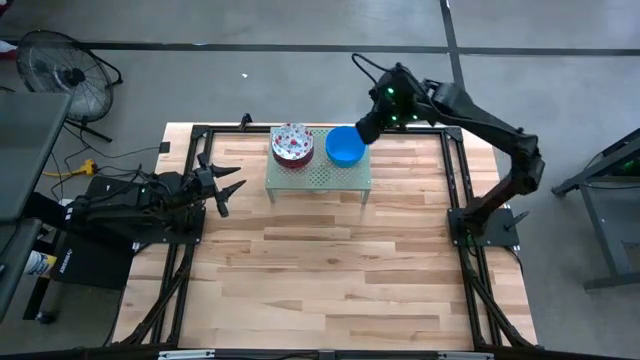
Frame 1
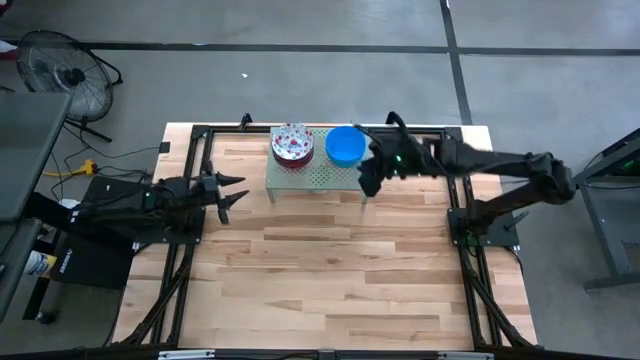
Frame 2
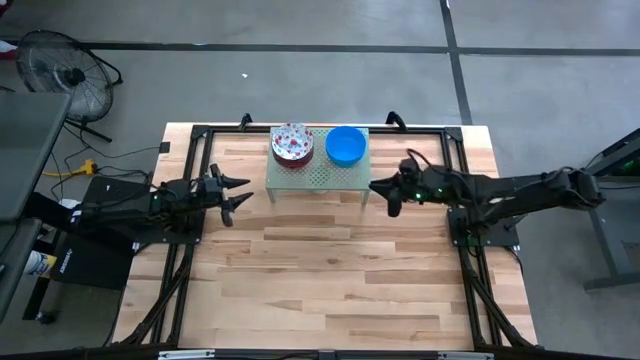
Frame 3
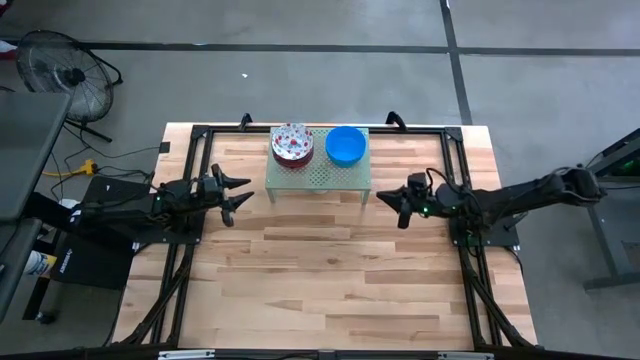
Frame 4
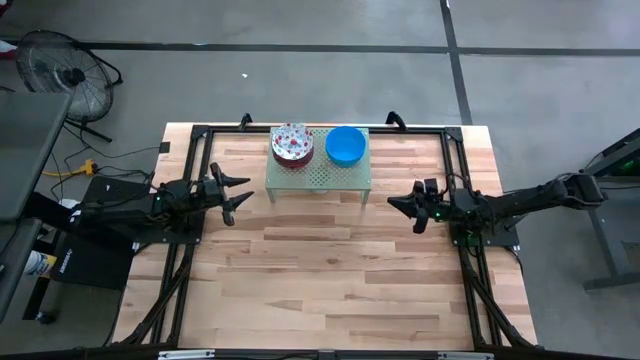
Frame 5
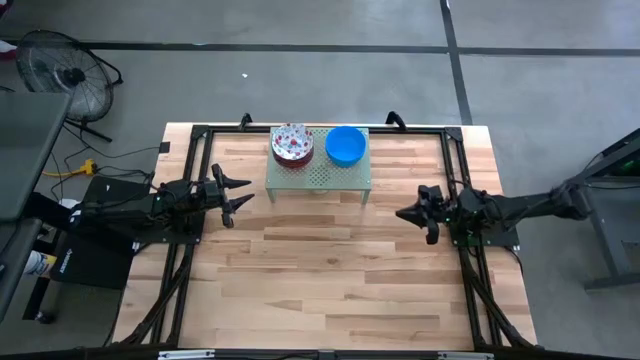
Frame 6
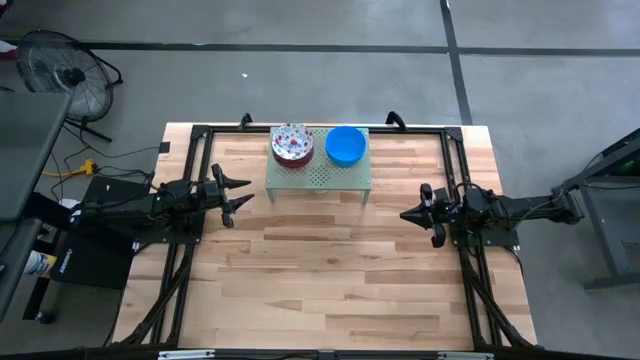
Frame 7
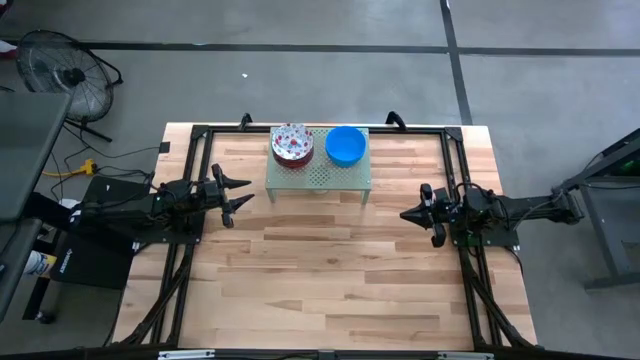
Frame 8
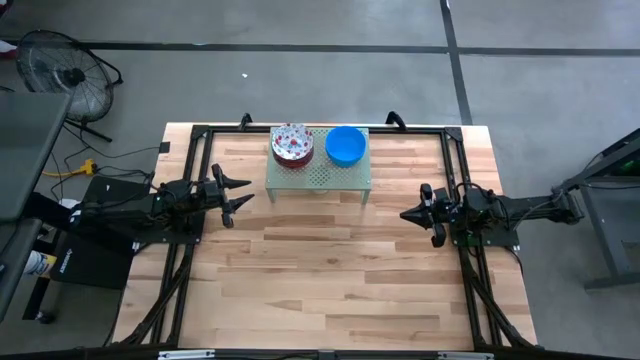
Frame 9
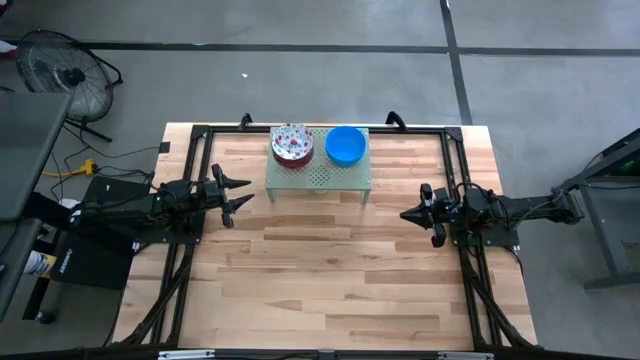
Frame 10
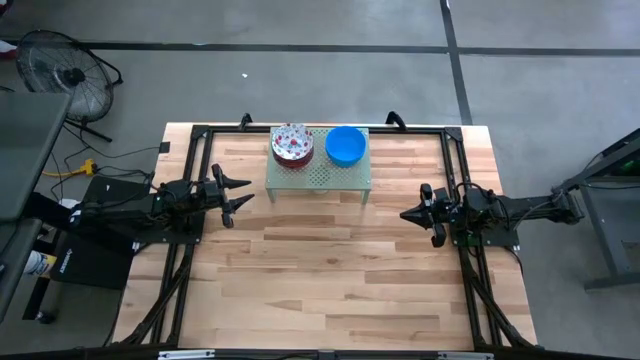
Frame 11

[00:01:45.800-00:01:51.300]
Task: Pick & Place Mini bowls
Return to Home Position

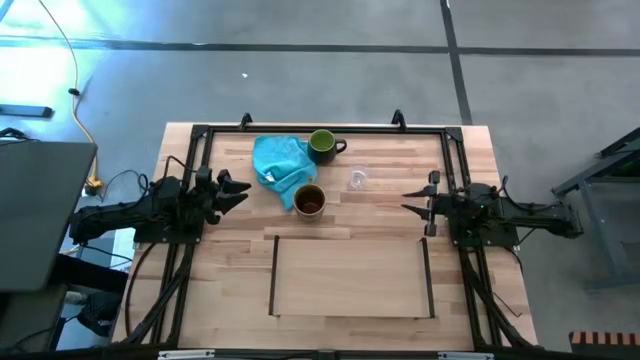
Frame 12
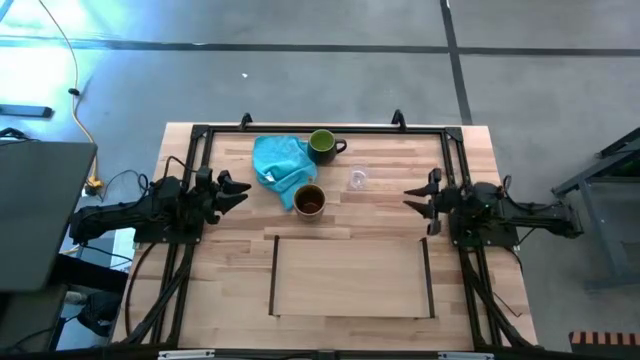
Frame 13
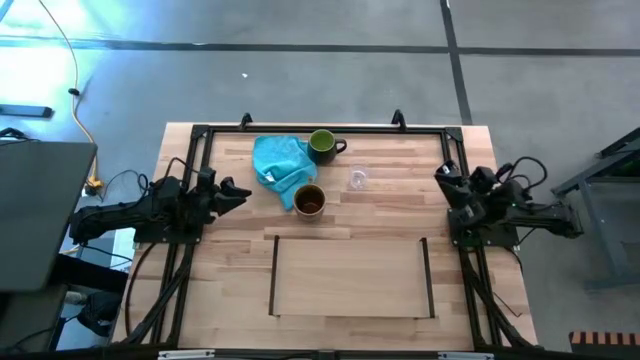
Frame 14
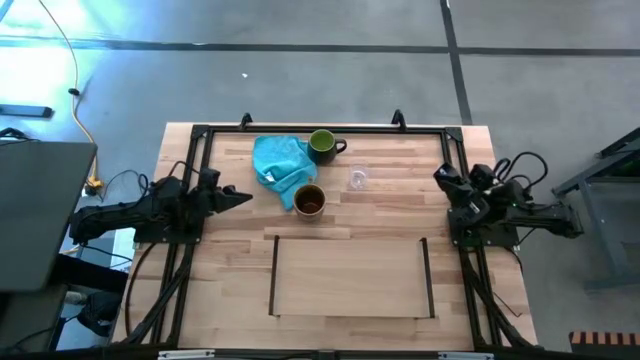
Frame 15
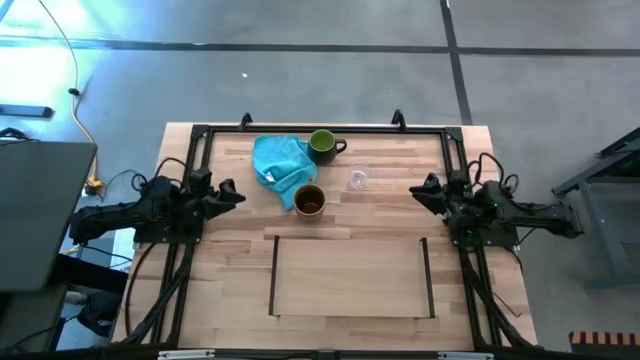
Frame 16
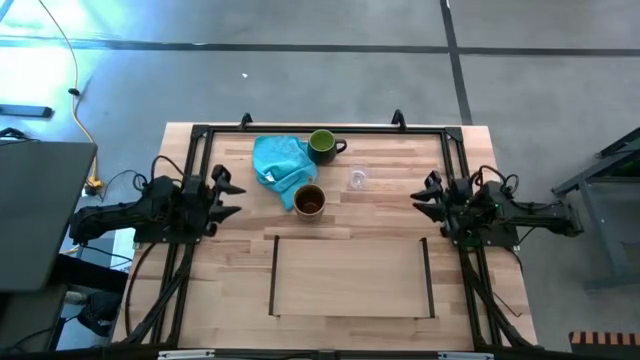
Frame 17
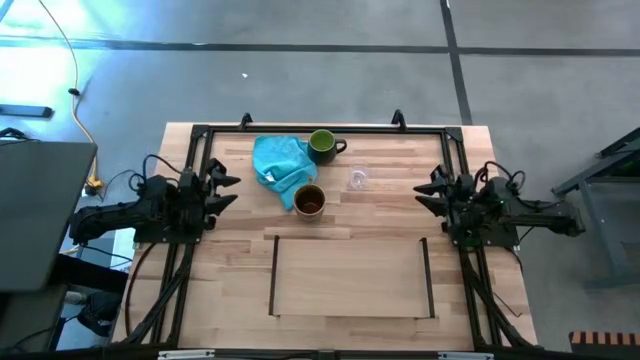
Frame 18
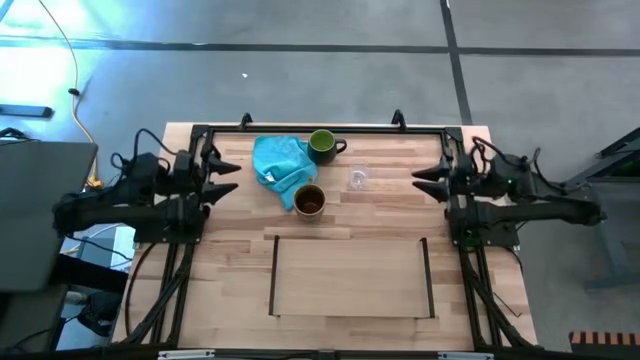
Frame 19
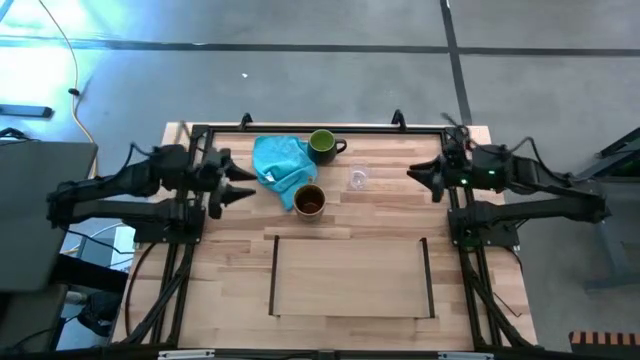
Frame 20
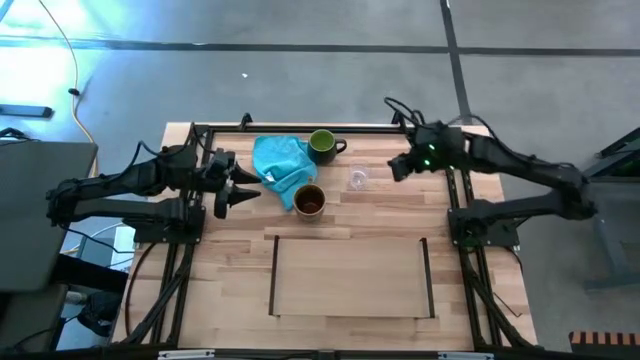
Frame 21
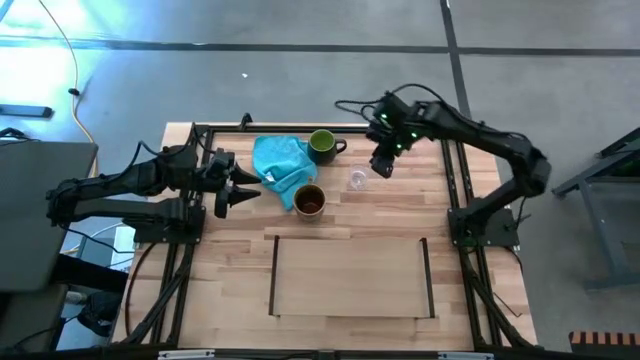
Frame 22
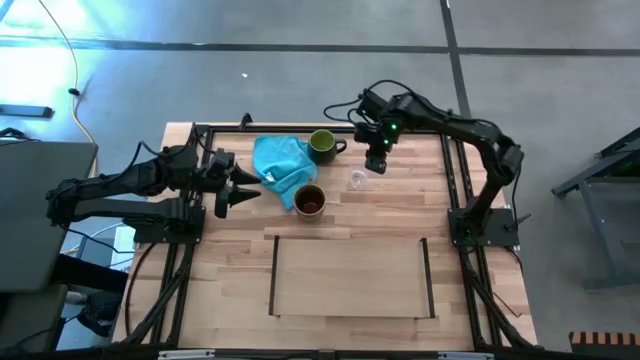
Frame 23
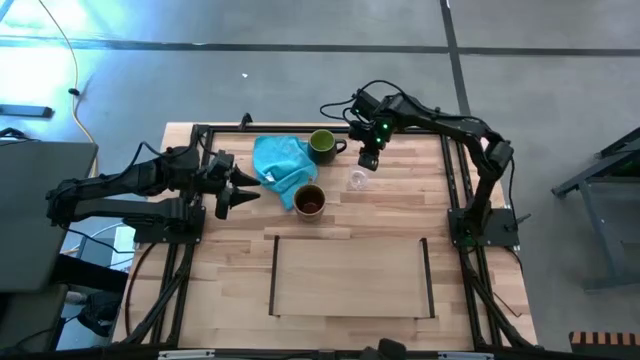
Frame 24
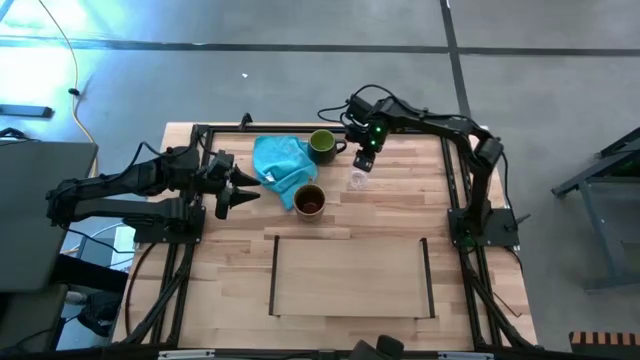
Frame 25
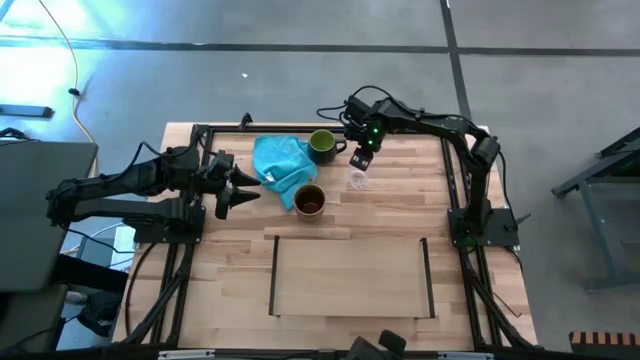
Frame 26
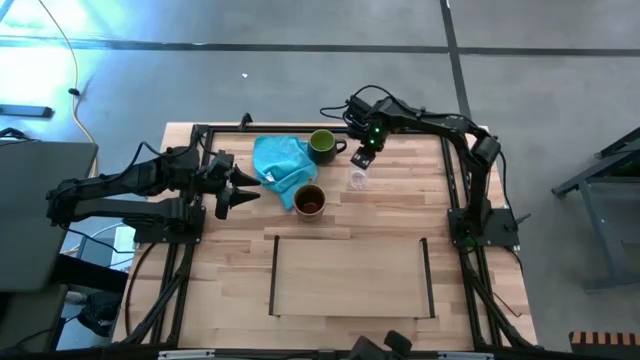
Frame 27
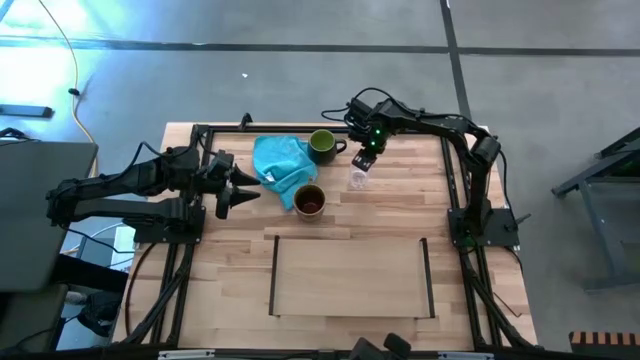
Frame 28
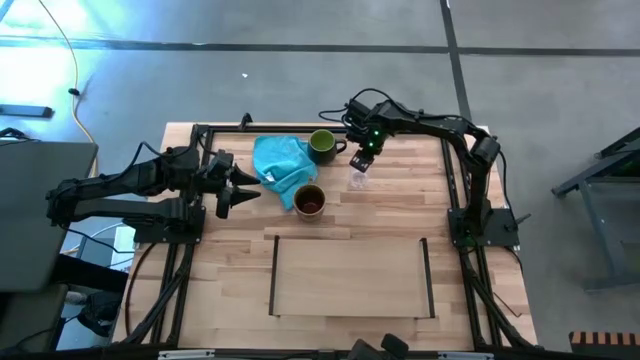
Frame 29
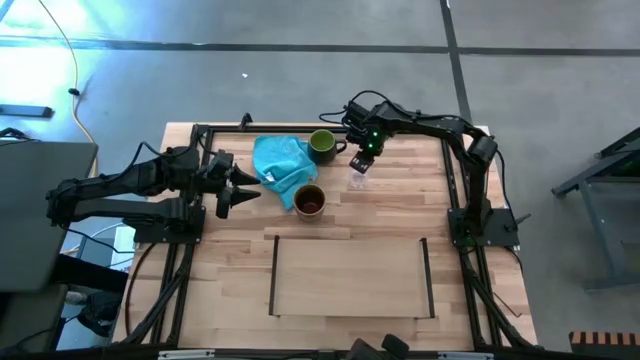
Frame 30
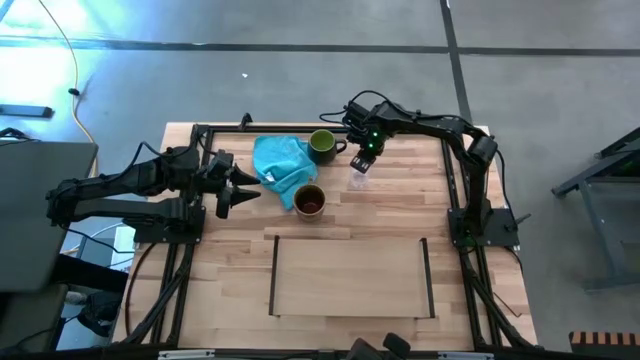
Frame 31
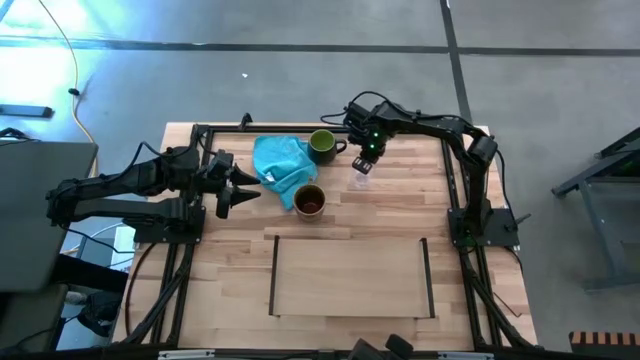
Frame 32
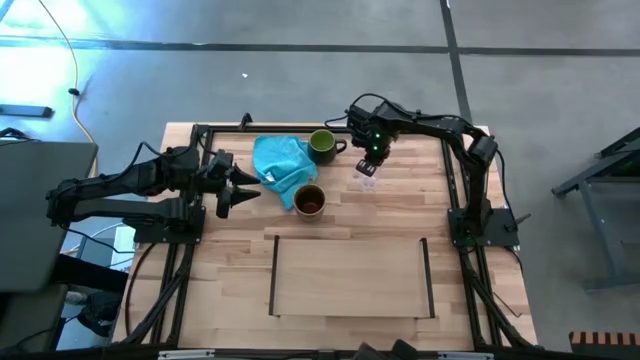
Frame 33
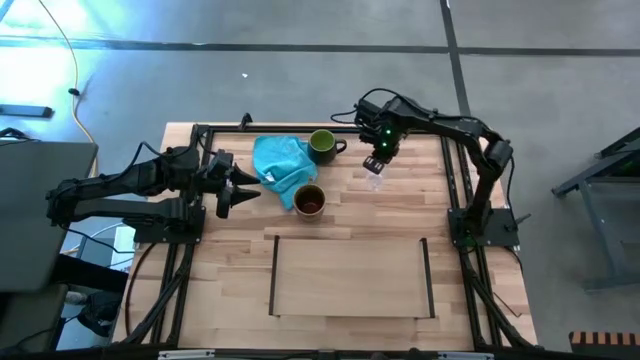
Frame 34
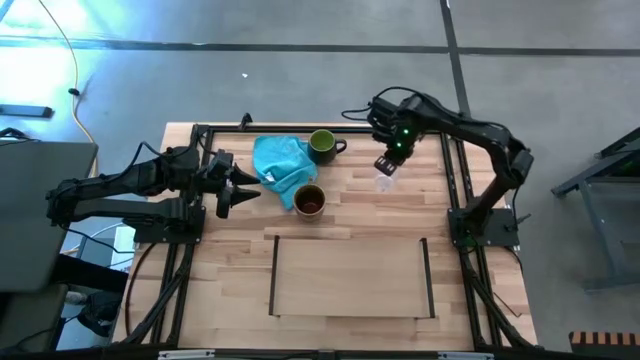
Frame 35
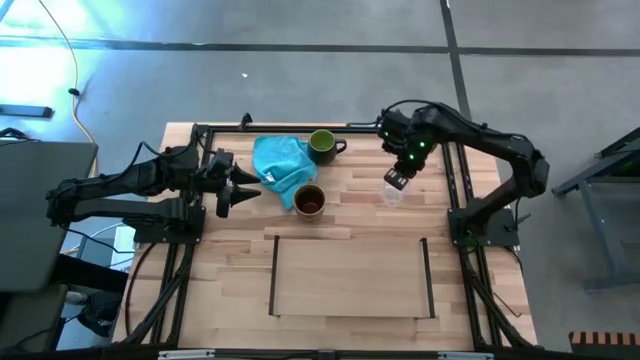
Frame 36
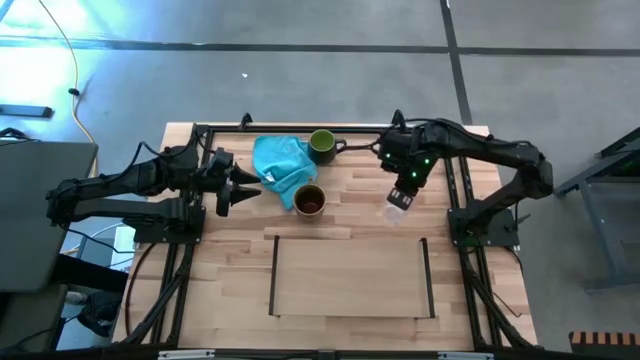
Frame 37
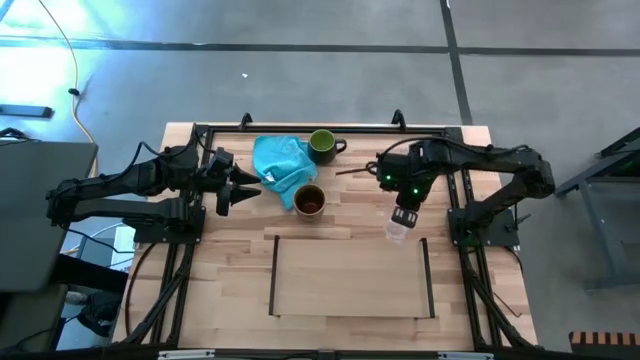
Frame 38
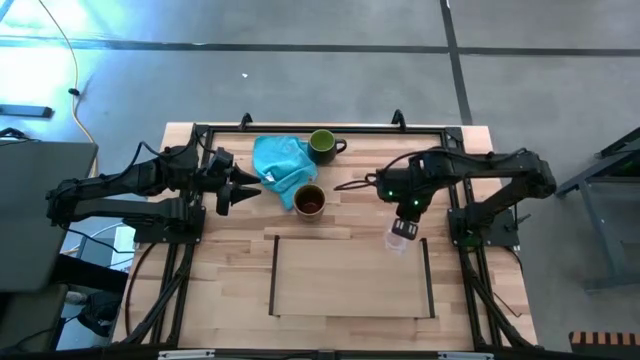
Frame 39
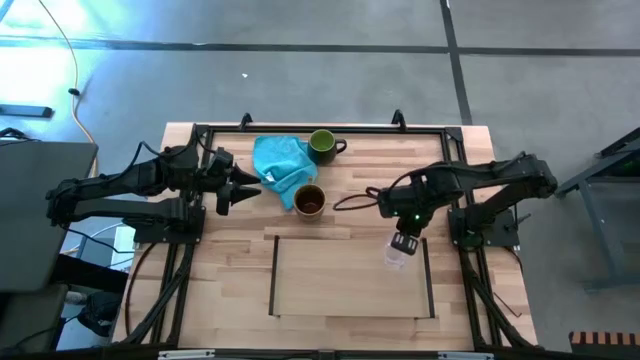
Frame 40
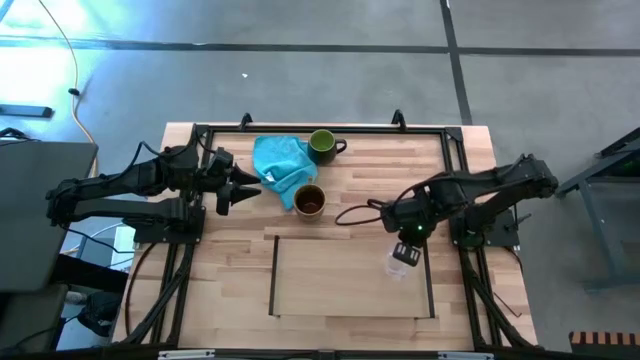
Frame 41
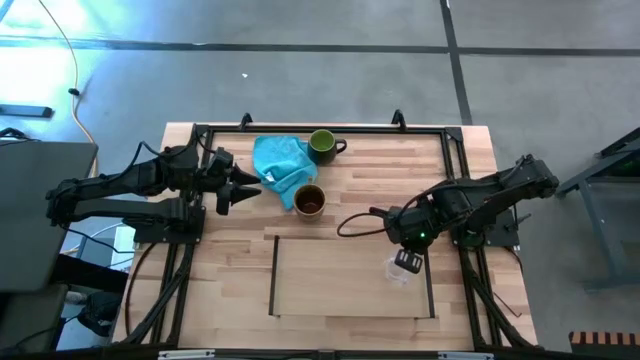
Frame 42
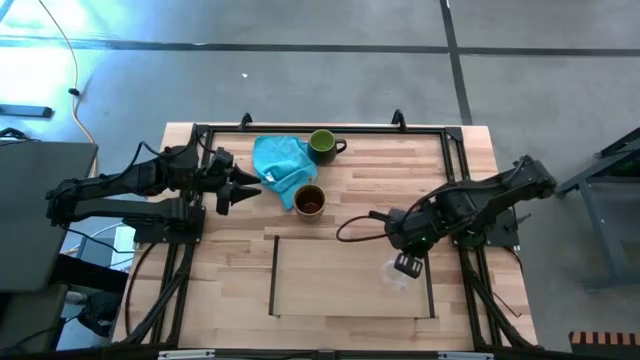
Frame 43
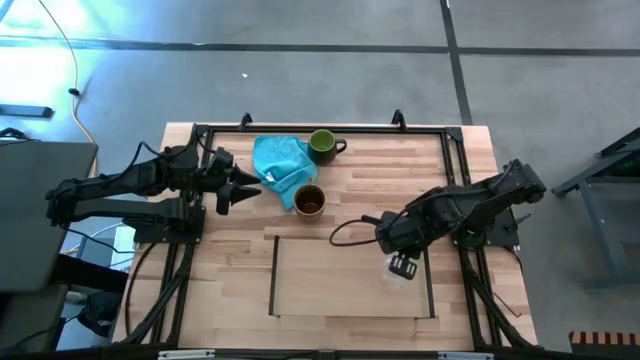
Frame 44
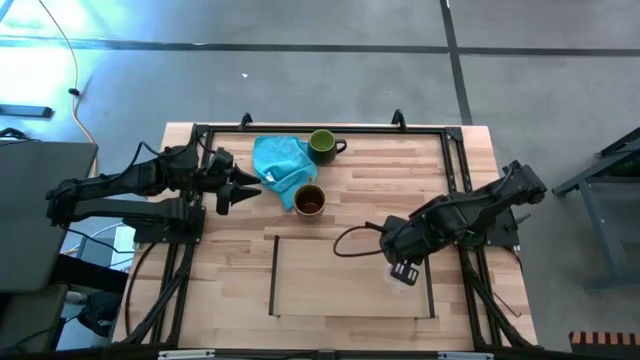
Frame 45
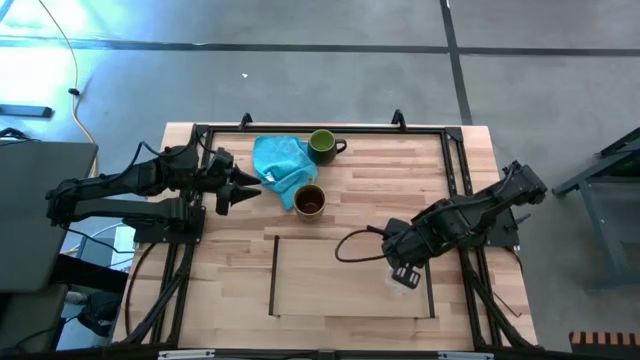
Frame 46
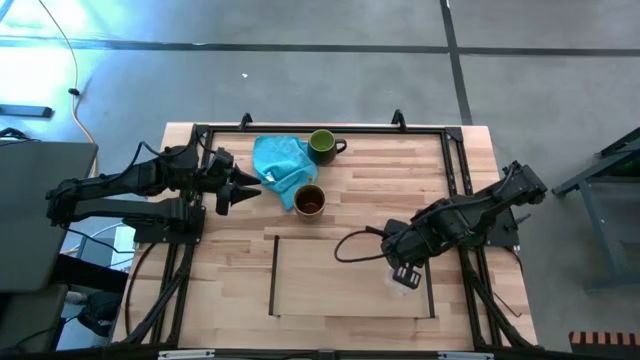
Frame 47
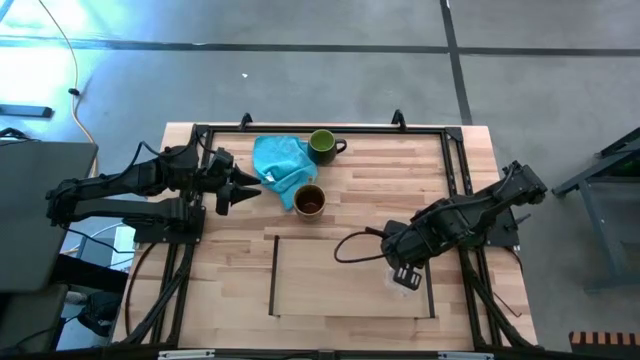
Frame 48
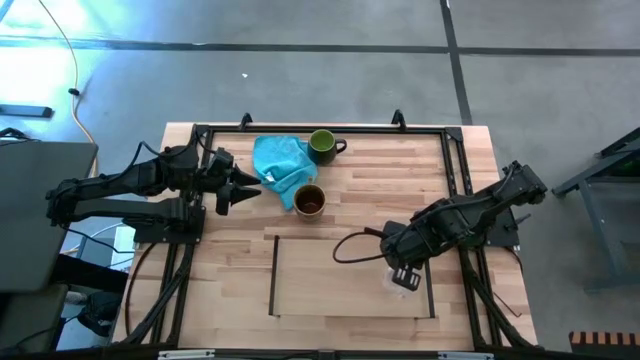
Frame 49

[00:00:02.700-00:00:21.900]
Task: Stack small to large cups/mugs on shelf
Put the transparent mug on the shelf
